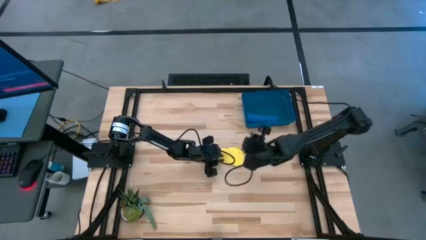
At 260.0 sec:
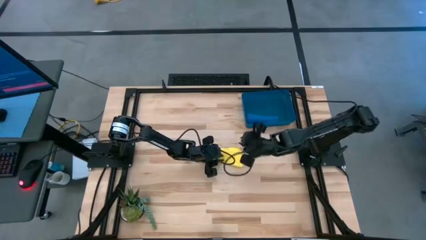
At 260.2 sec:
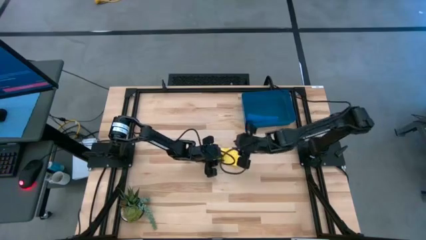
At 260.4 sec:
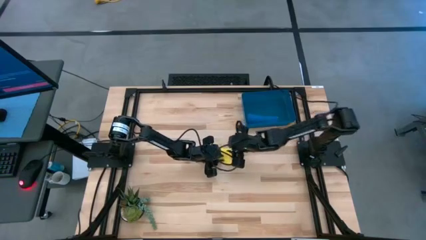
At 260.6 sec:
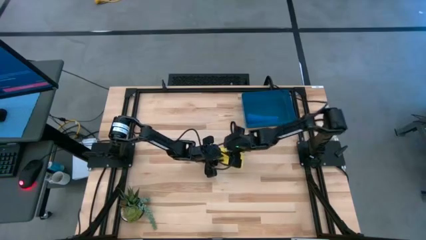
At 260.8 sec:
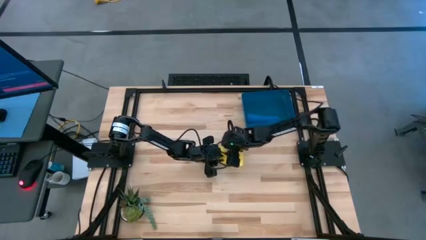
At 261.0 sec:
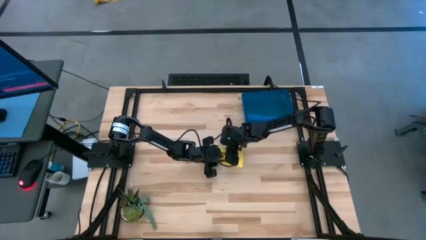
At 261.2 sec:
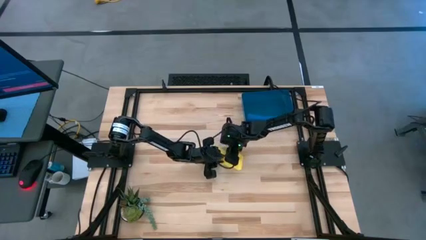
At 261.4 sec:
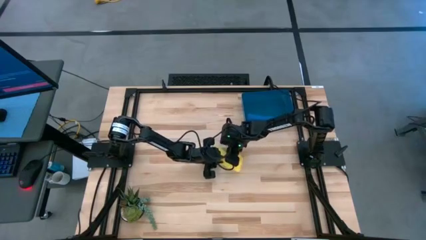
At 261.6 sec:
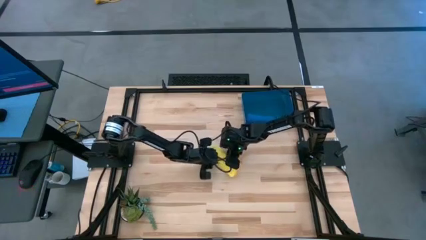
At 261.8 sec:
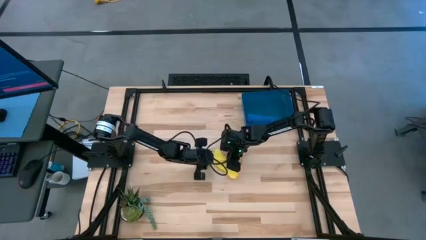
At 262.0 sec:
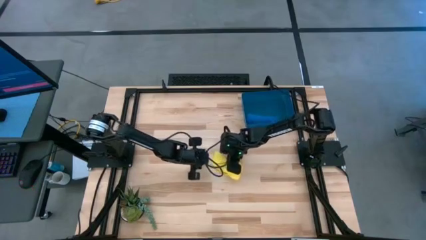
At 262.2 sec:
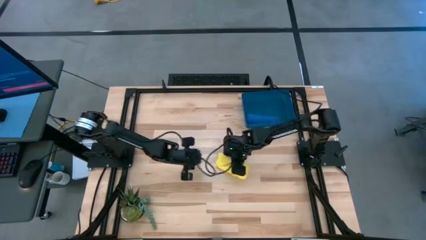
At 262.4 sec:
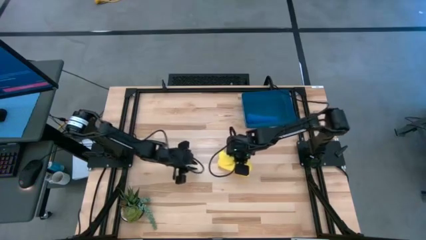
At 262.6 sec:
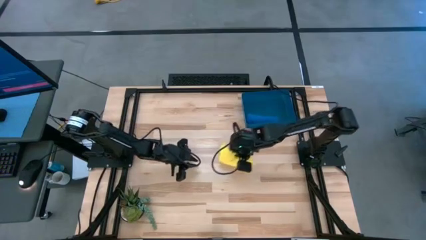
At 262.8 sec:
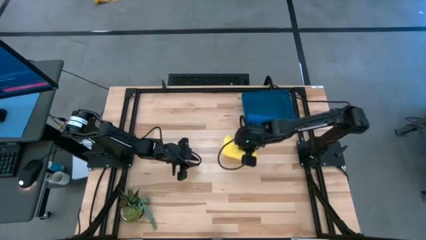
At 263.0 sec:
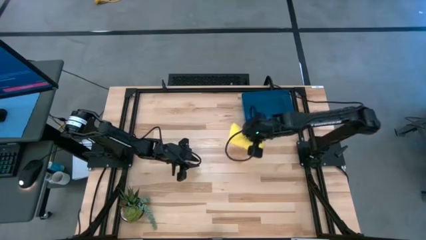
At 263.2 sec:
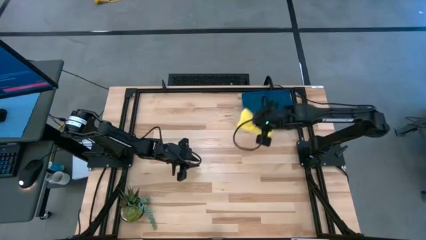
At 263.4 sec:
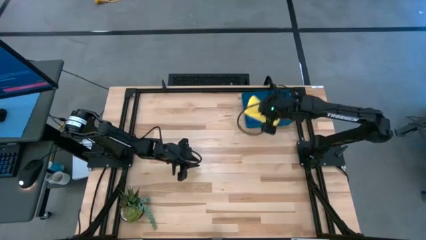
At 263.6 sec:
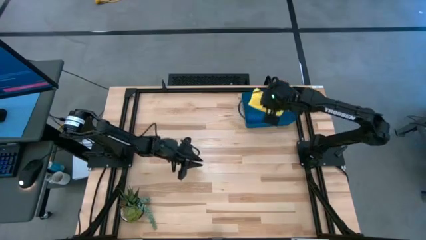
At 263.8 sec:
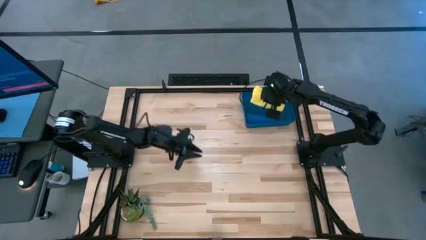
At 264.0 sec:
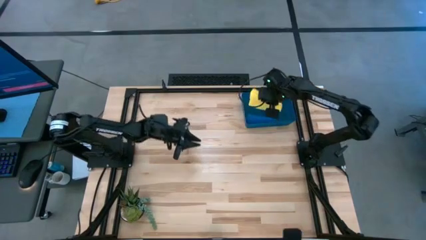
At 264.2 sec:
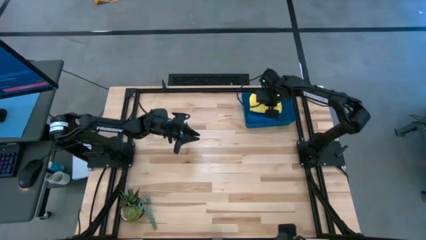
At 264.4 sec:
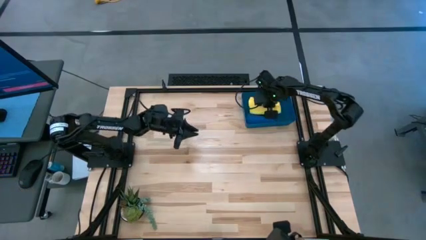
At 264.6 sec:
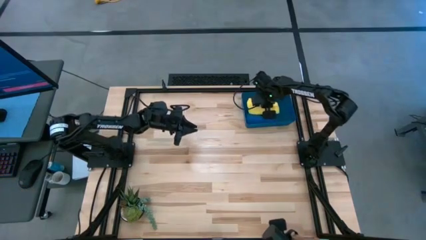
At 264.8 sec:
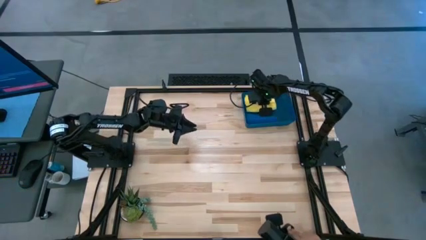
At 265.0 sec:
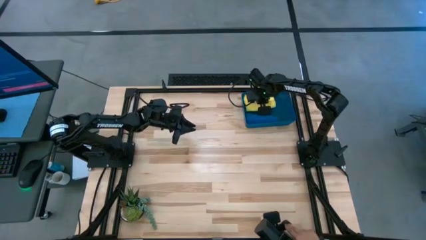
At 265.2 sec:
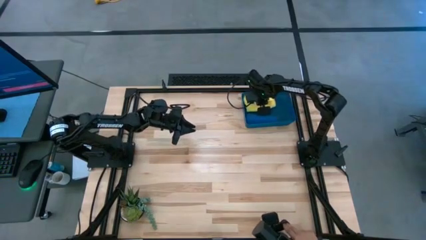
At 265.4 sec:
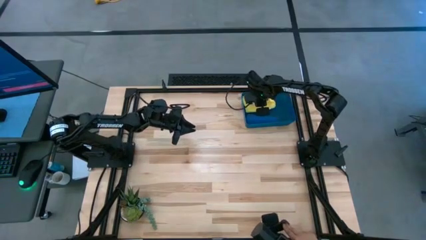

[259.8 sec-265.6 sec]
Task: Roll microfiber towels into tight, uniform cylinder then place into a basket
Put the rolled yellow microfiber cloth into the blue bin

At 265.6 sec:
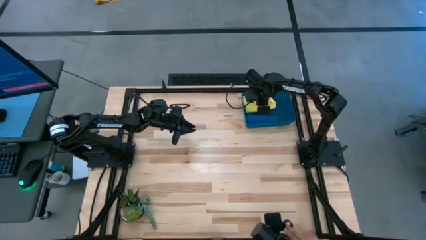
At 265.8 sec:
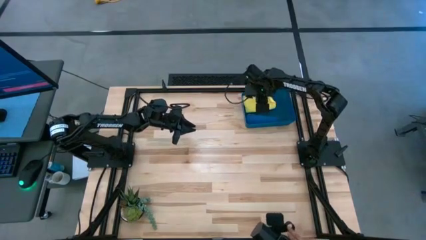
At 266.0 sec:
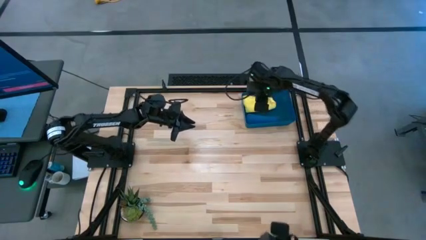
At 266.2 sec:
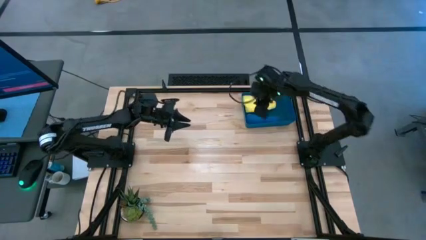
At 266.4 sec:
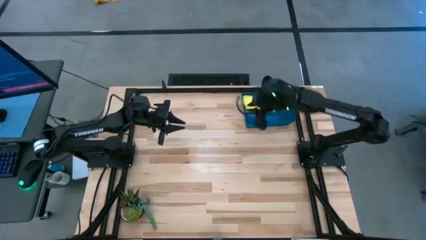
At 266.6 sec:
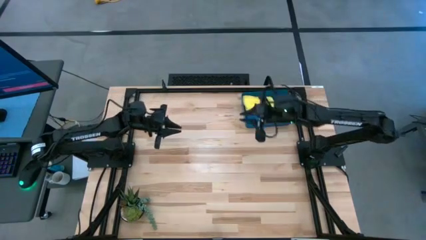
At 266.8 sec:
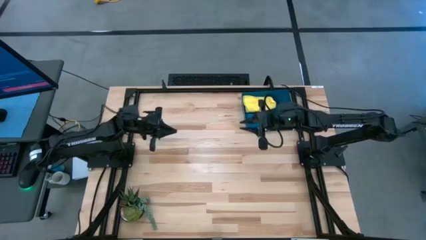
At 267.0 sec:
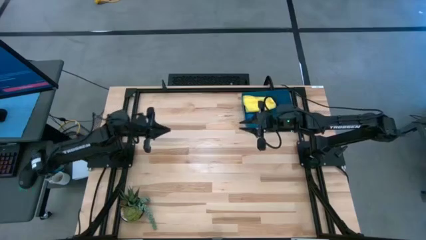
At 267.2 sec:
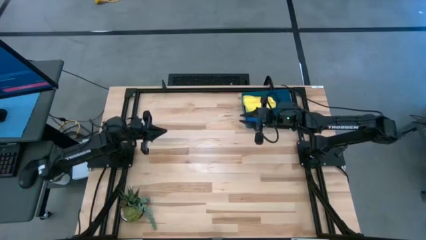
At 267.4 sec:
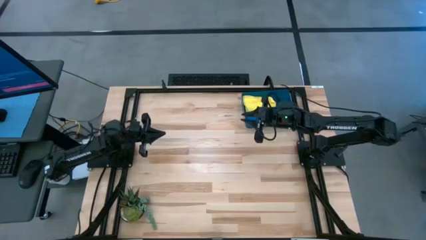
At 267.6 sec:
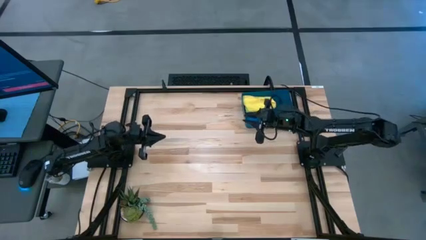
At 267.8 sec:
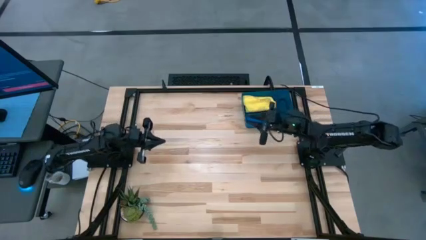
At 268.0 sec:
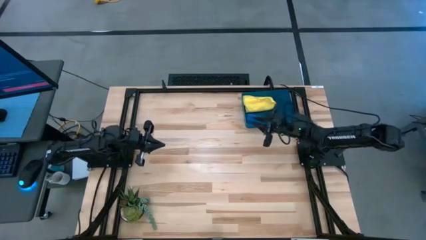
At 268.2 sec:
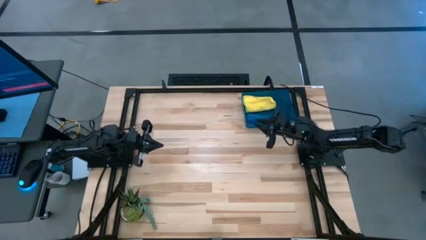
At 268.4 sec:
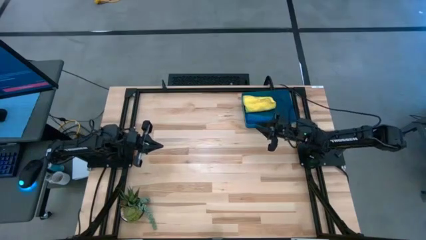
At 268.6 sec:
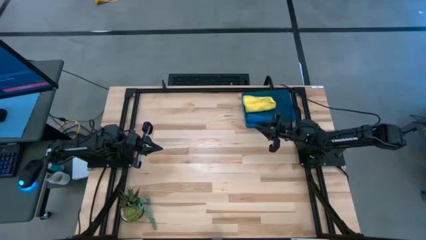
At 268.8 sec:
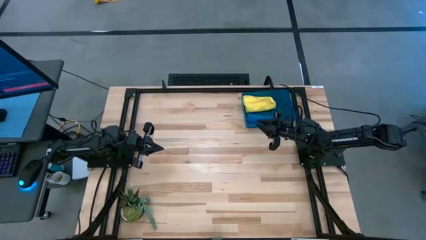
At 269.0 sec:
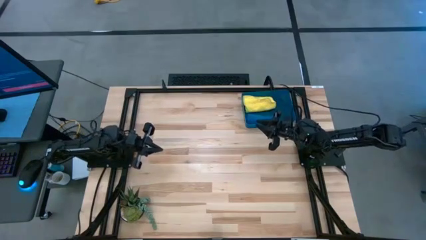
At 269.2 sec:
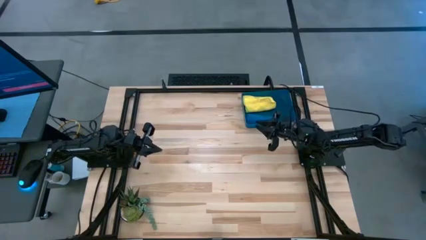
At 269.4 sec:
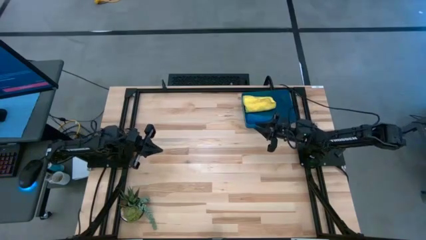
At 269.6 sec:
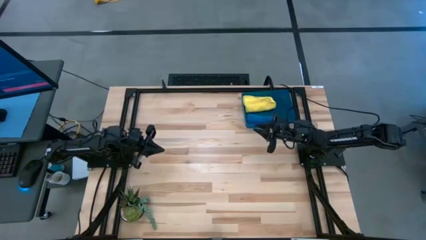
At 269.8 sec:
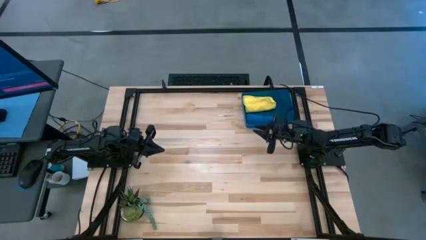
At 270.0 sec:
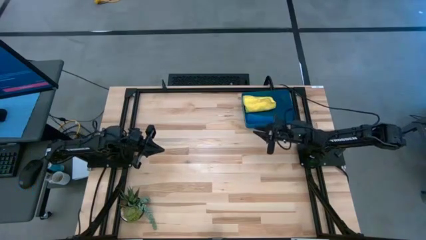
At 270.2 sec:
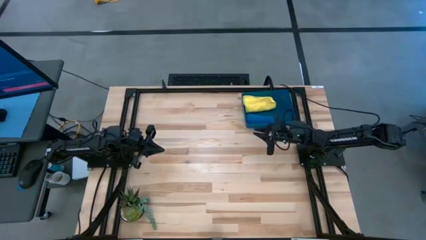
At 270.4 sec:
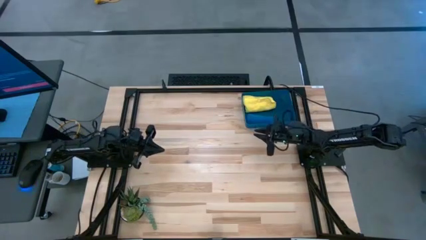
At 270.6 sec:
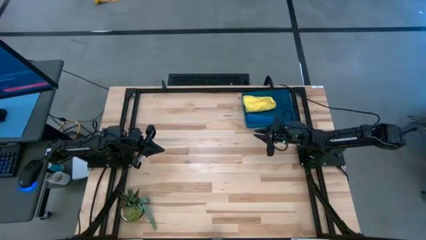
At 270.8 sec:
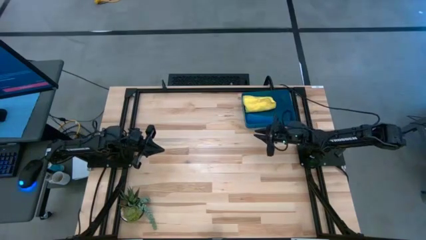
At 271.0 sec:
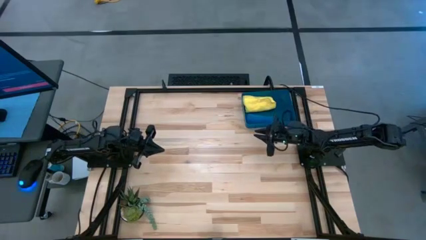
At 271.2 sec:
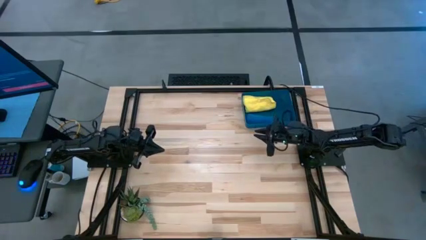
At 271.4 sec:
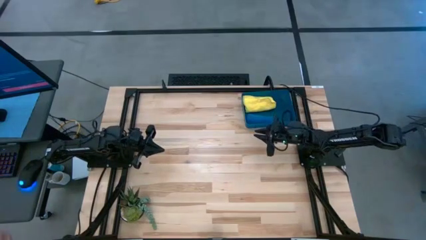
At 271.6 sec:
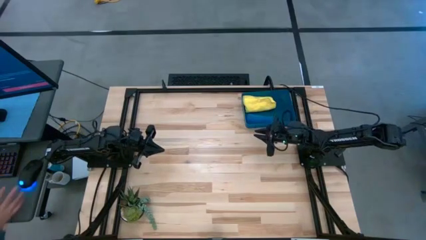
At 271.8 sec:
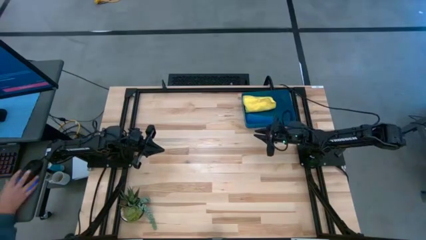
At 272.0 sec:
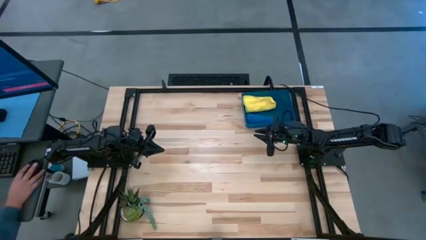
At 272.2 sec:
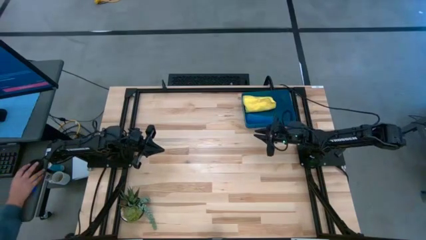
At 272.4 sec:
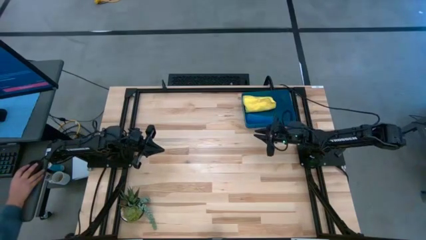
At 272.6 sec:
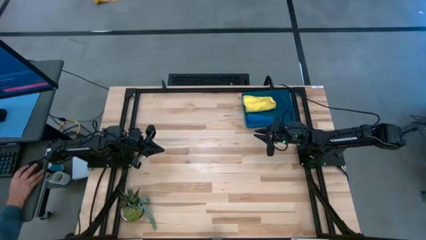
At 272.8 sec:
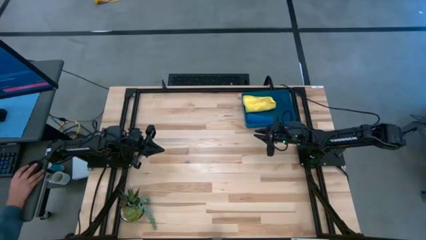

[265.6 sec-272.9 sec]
Return to Home Position

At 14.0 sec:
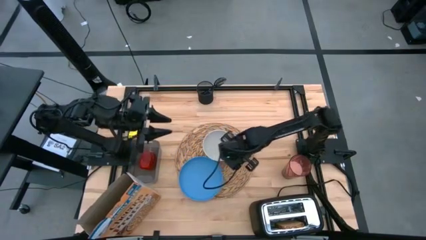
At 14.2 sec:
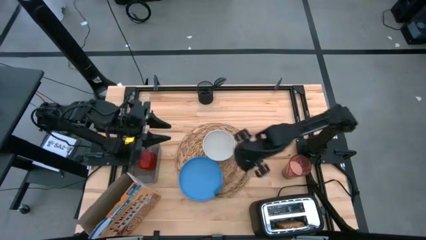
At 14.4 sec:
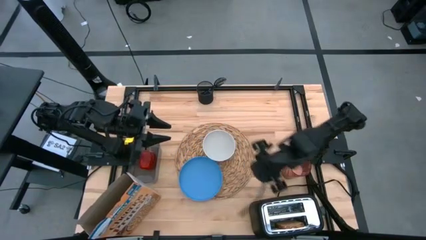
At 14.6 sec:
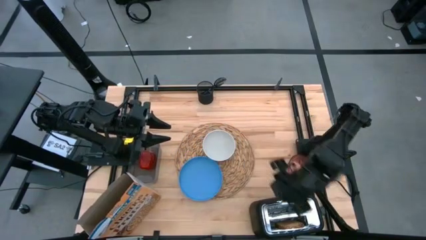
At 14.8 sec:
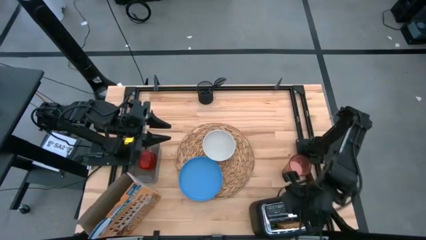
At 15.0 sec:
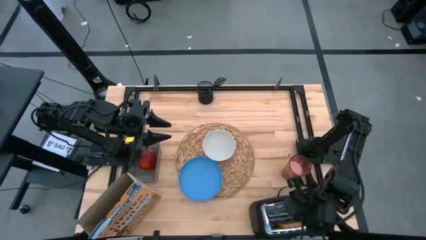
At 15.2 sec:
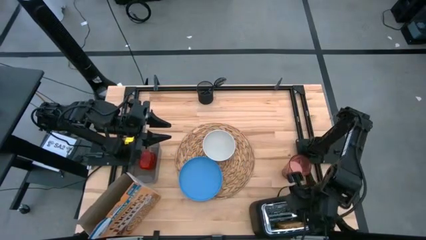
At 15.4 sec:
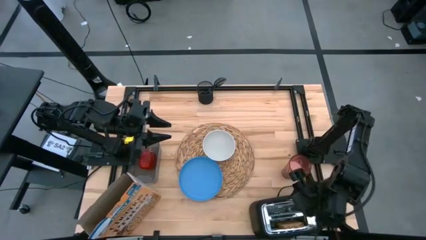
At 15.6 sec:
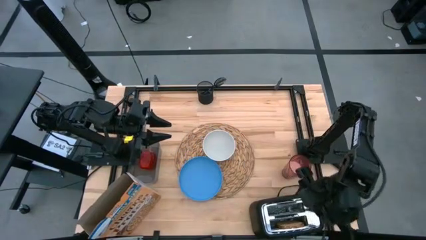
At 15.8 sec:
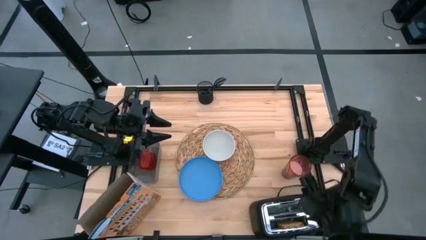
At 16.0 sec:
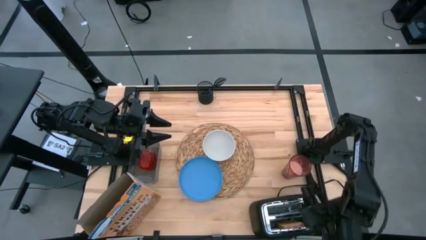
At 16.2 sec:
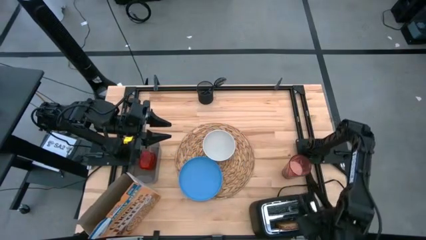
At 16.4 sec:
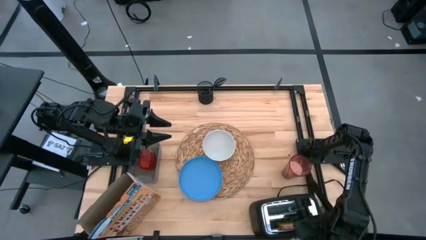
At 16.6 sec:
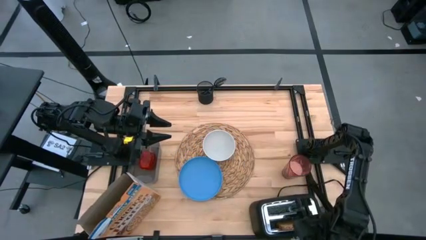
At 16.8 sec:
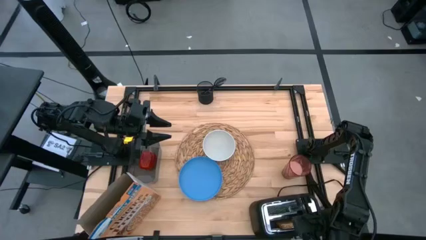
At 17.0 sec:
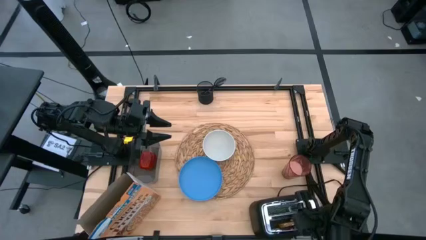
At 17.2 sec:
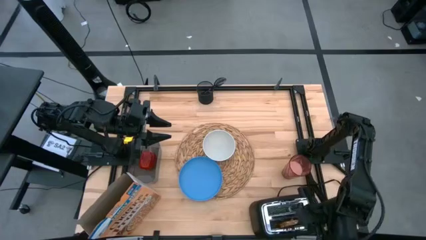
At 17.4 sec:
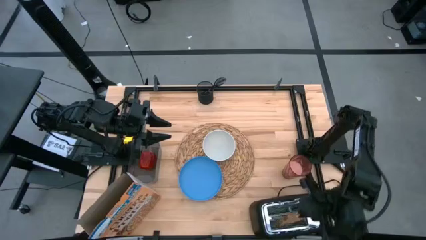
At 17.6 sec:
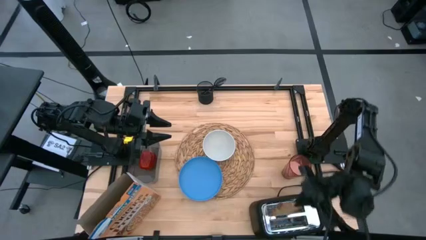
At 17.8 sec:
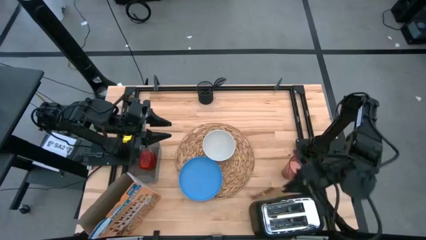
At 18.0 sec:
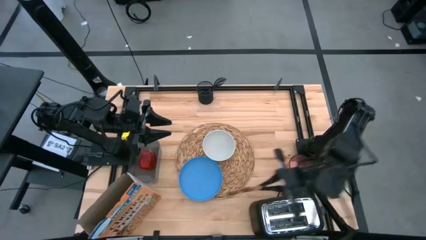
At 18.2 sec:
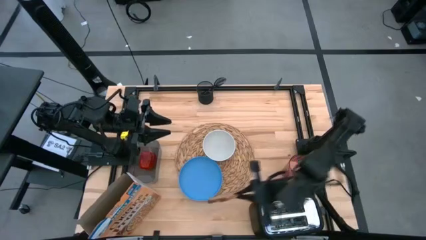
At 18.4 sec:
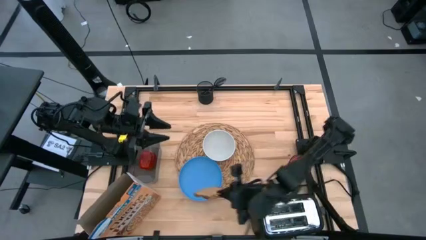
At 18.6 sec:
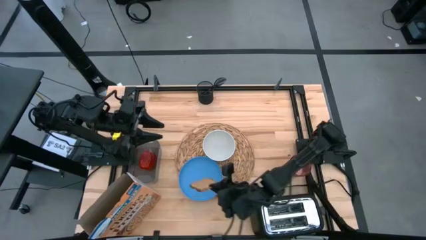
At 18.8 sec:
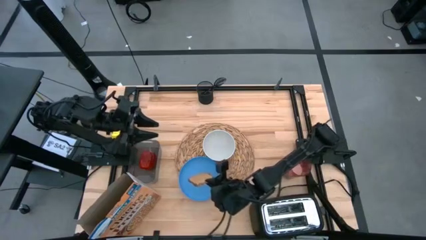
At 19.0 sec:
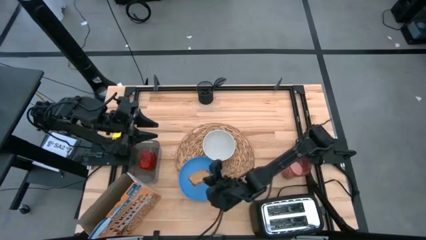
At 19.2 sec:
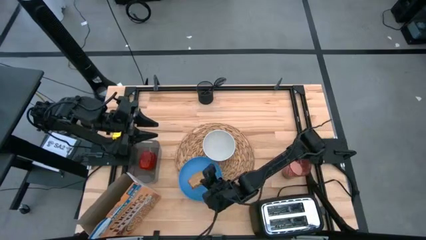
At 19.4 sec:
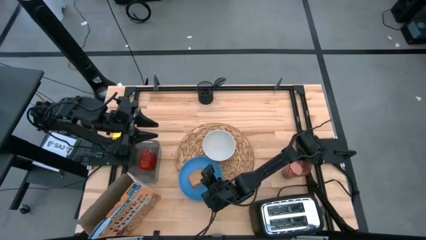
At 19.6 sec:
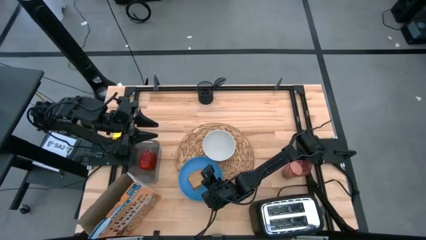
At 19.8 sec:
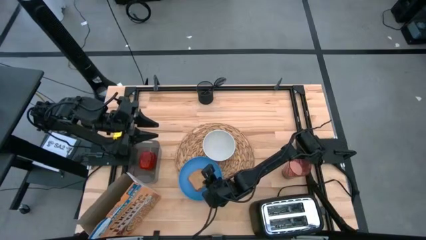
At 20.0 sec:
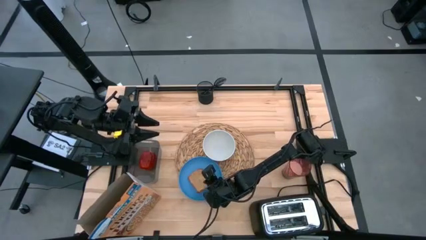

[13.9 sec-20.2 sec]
Task: Arrange a breakfast setting
Put the toast on the blue plate
